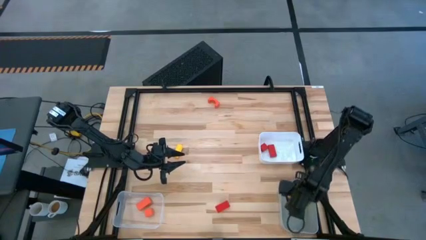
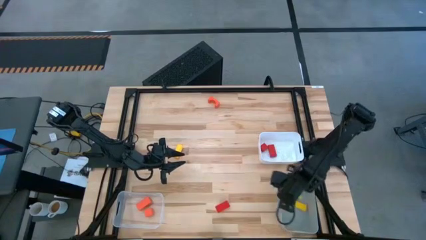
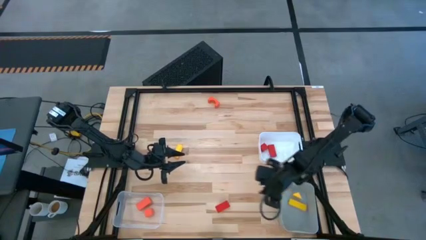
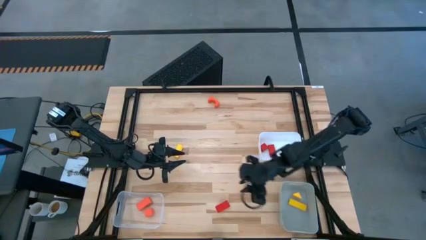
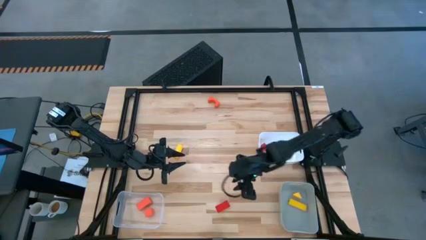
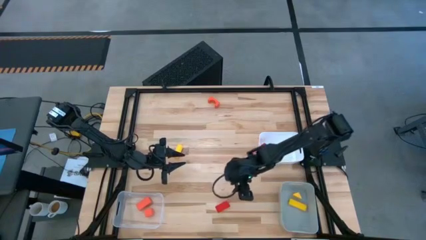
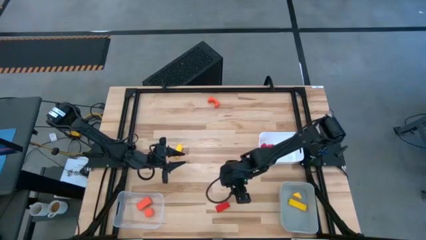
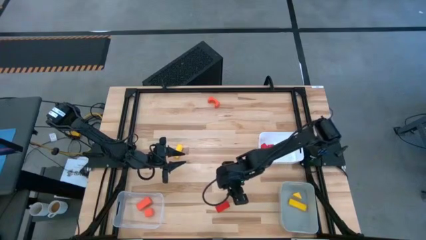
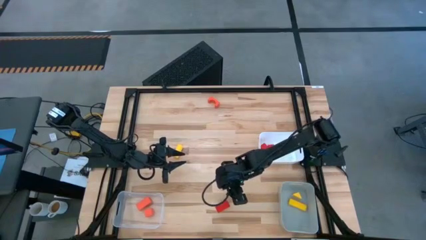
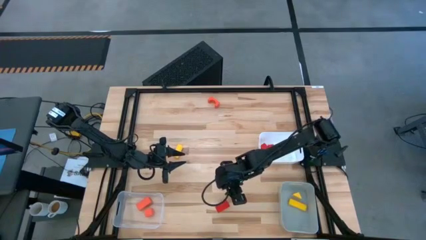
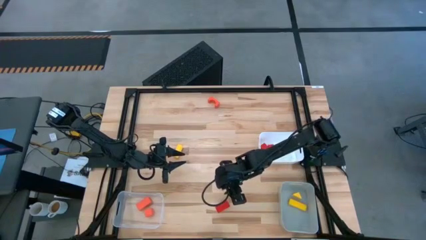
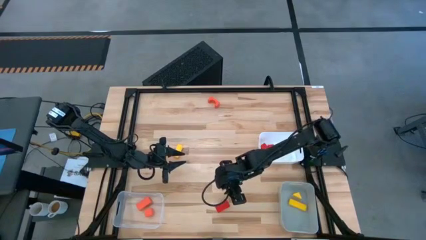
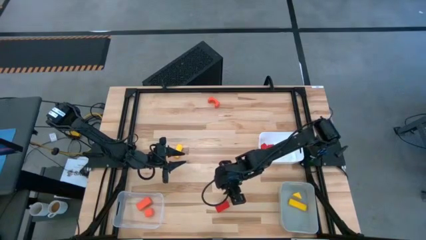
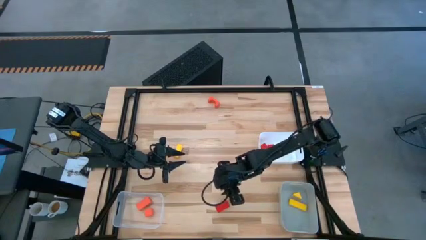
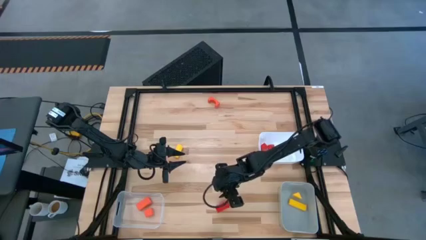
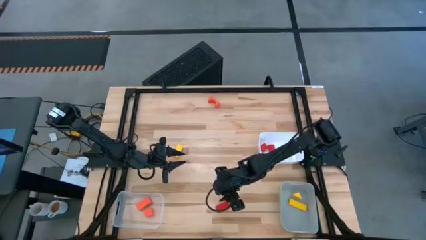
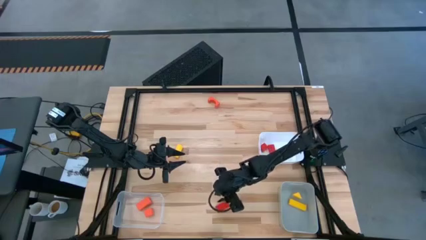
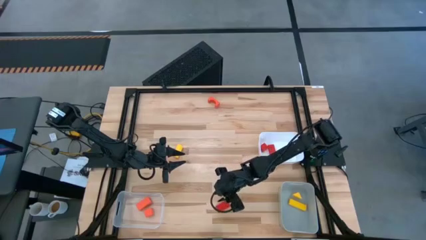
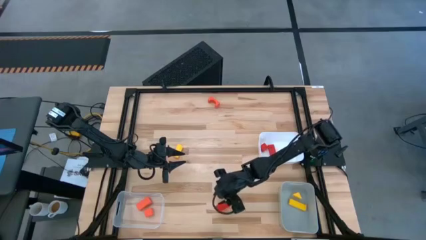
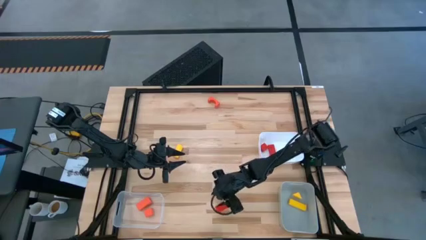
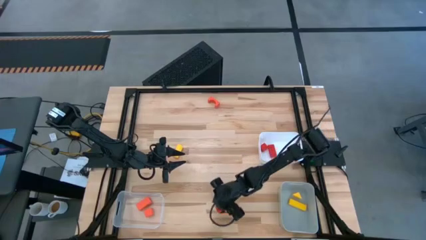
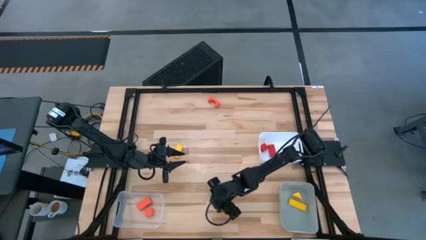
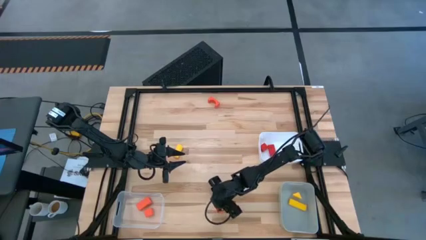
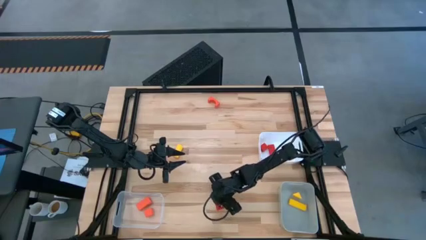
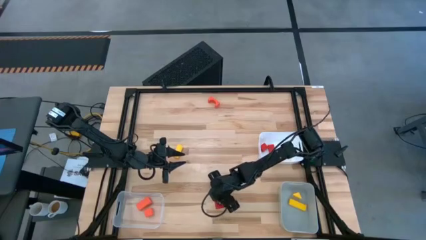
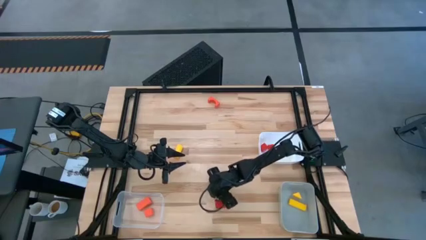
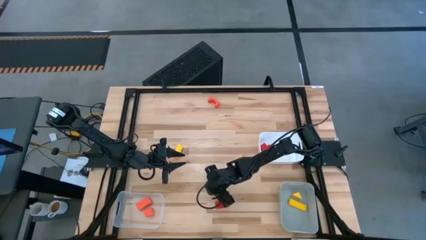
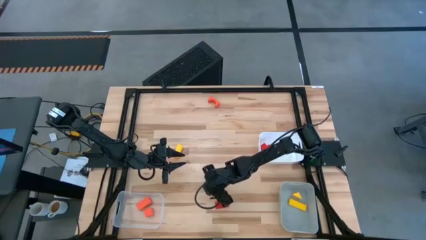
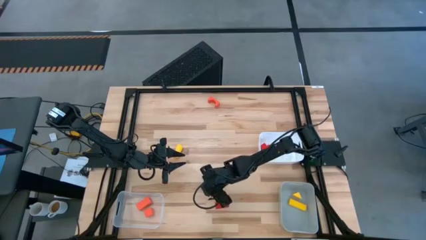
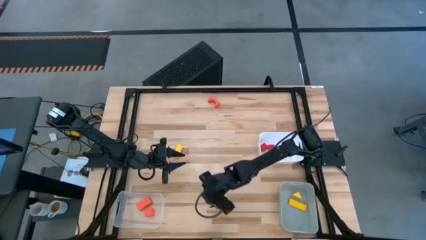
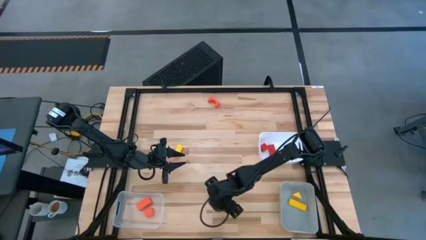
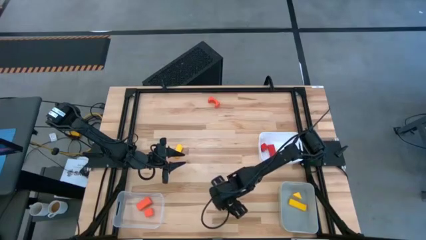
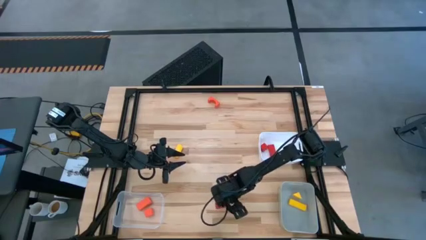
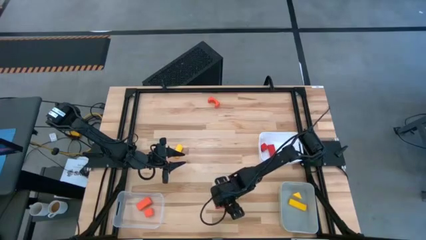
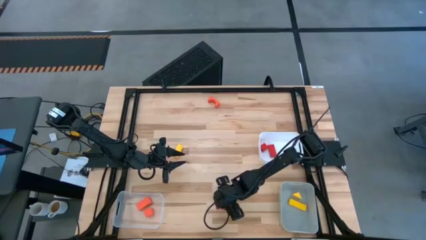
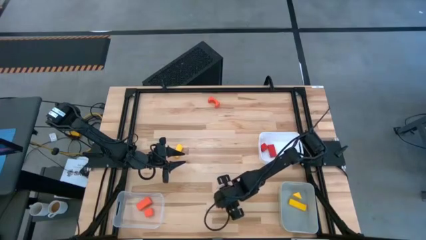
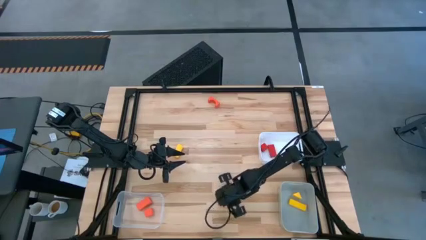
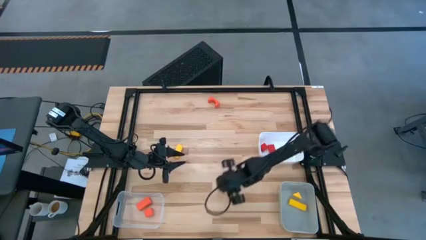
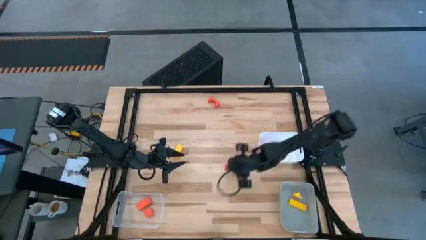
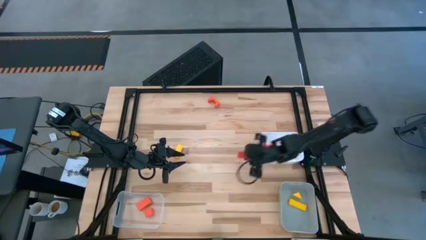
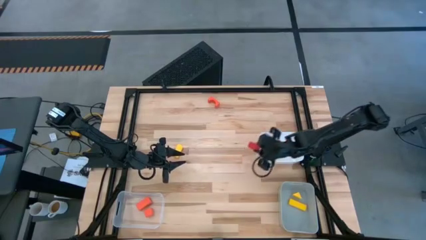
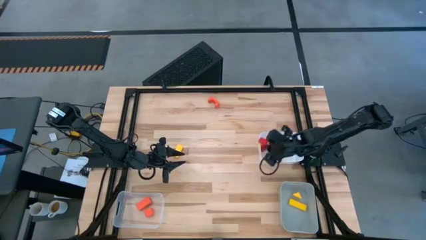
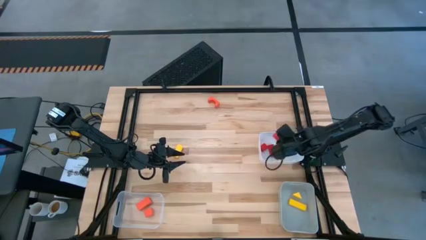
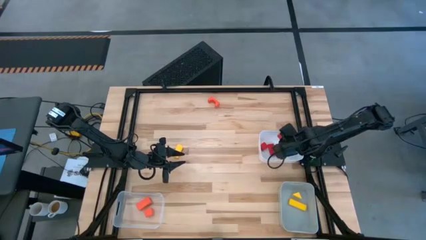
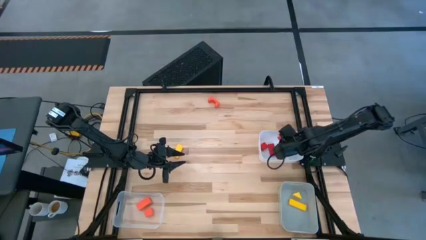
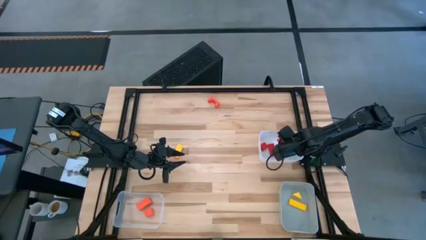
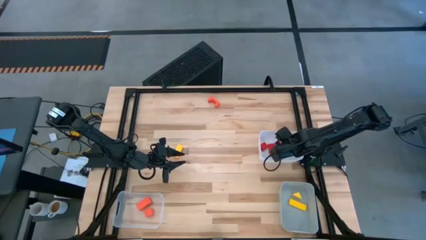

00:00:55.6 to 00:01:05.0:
Task: Sort & place blocks by color
Put the red block into the white bin

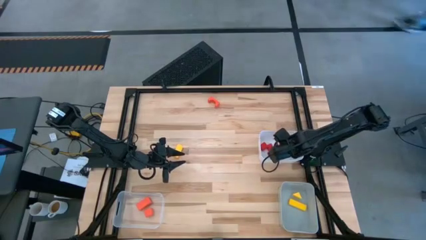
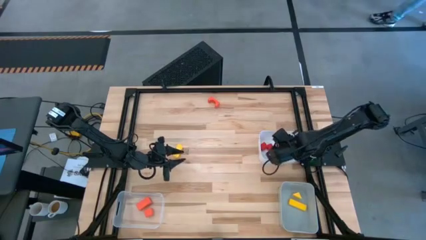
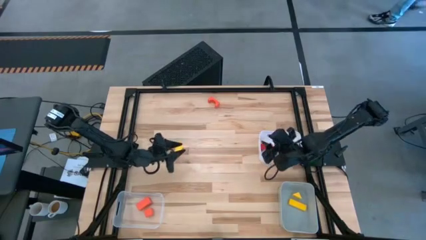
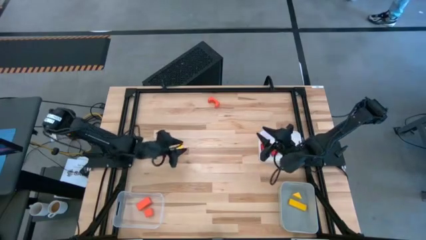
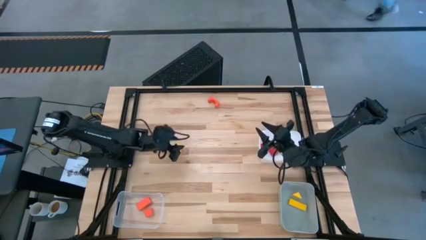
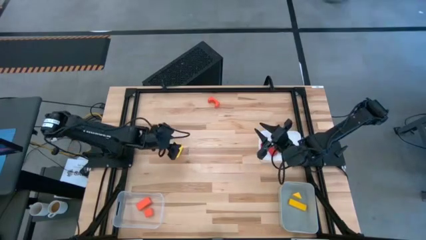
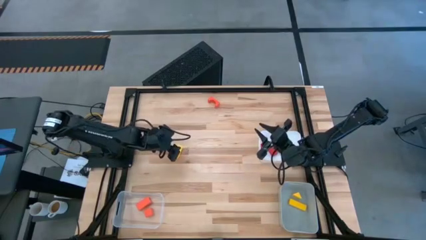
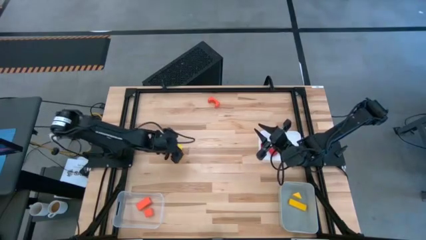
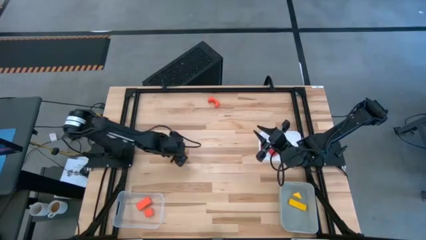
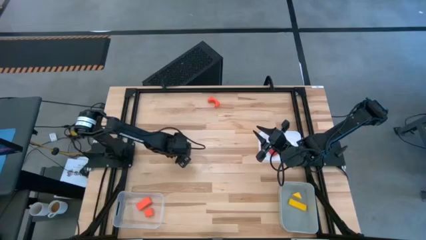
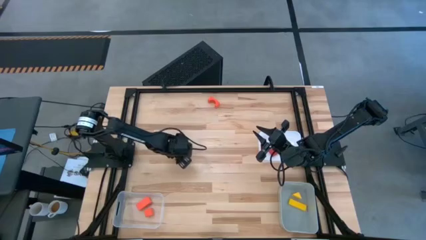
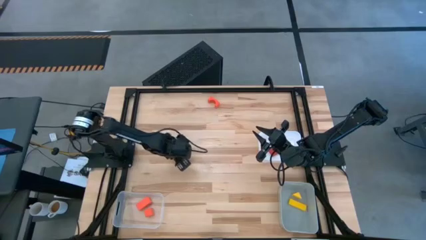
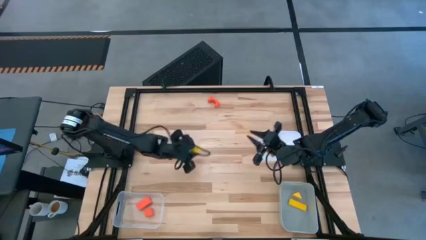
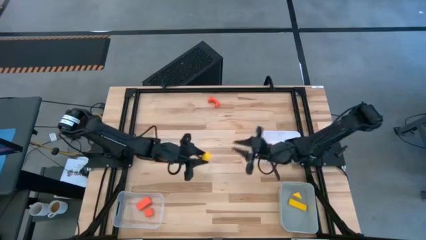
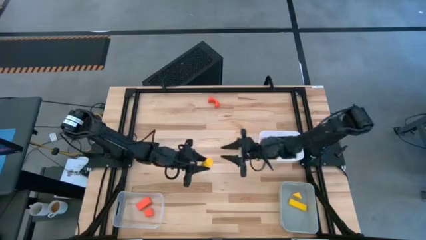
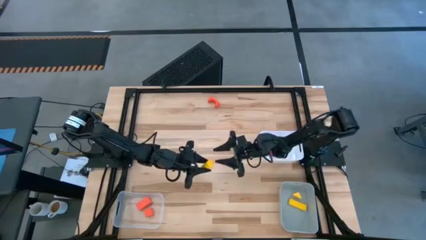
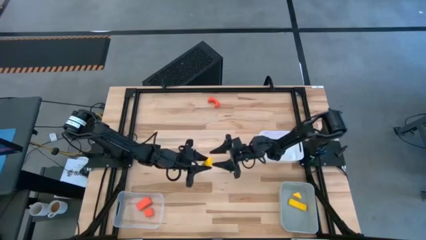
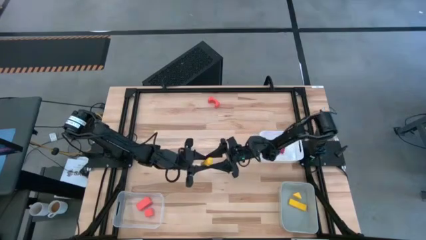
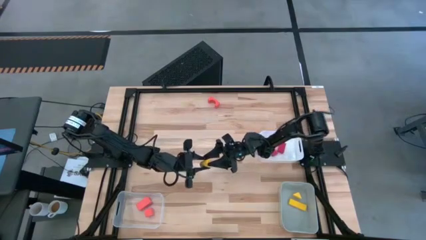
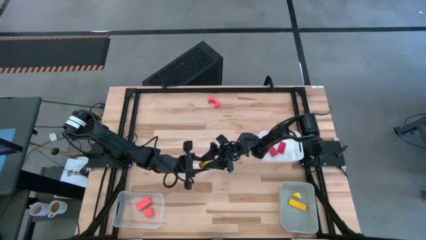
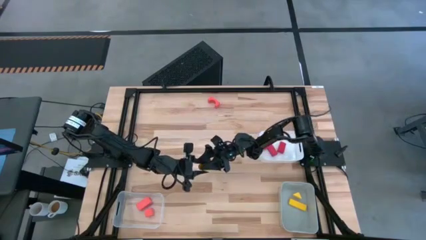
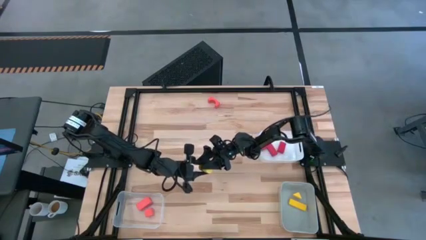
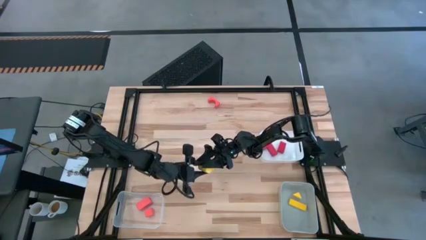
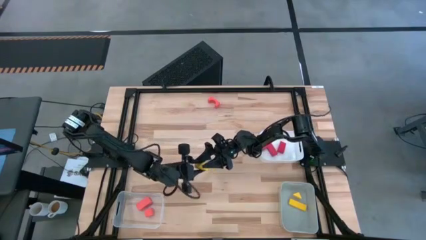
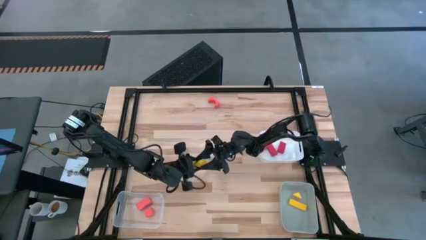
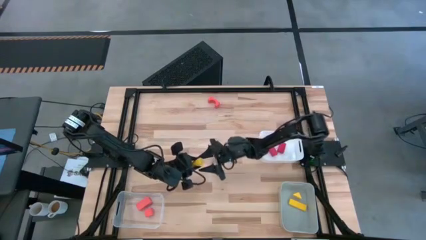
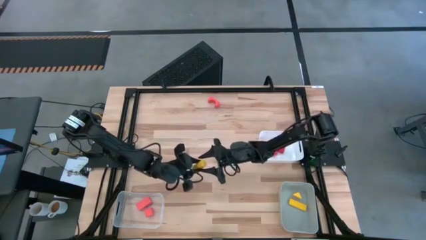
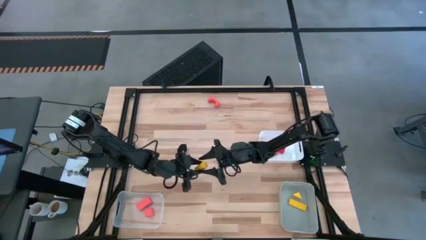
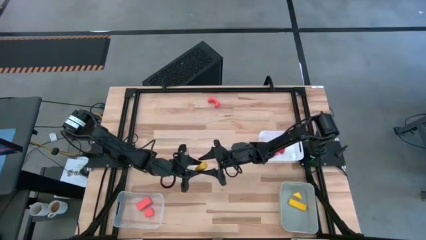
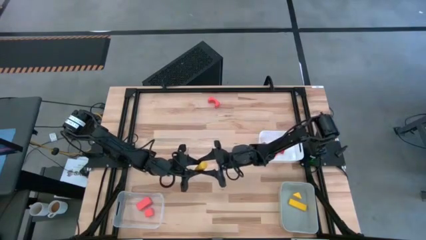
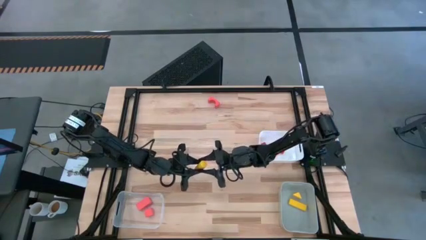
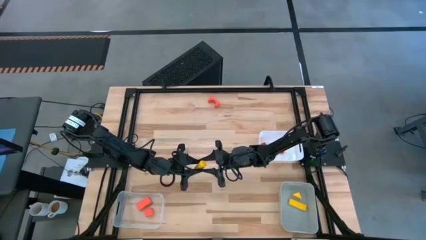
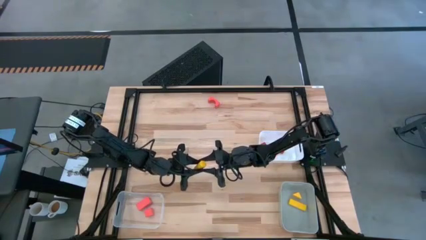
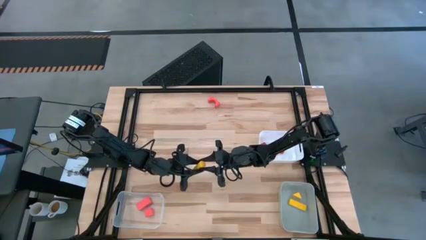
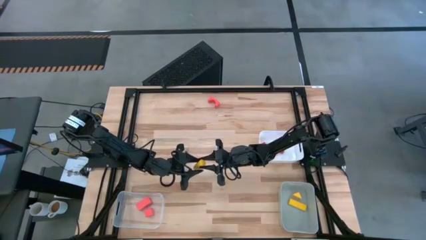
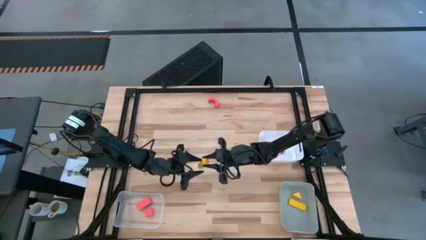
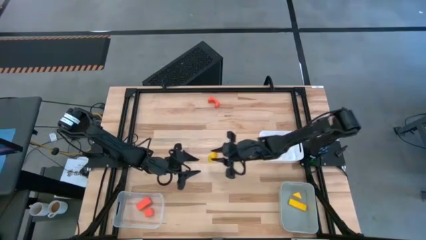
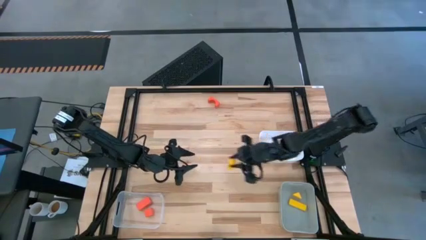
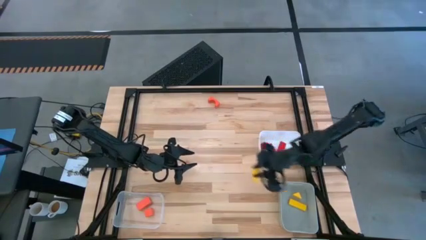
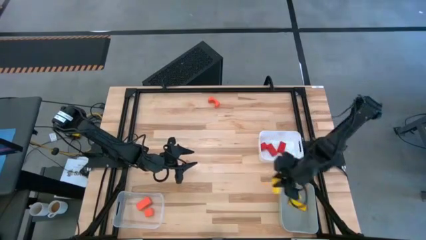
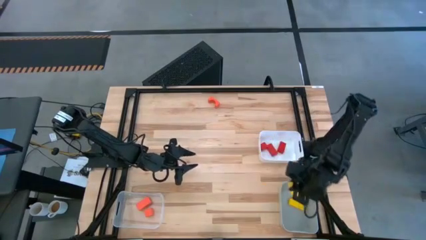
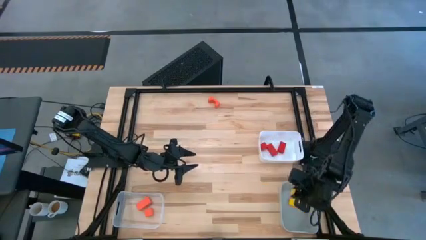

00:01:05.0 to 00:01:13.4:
Put the yellow block into the gray bin
